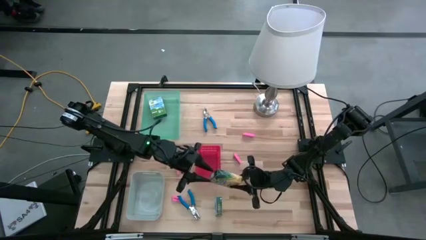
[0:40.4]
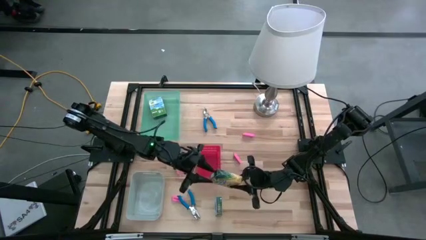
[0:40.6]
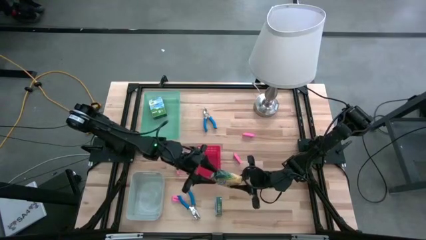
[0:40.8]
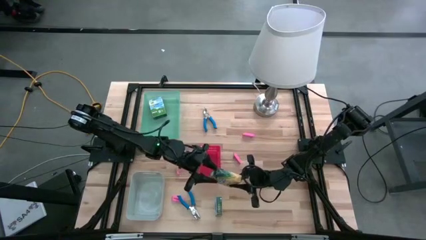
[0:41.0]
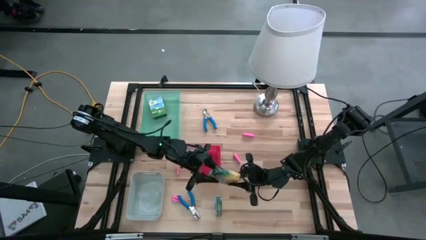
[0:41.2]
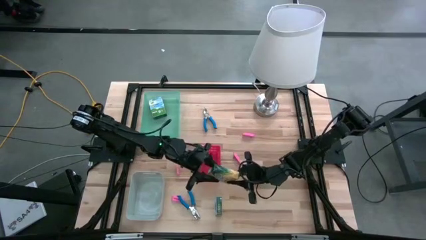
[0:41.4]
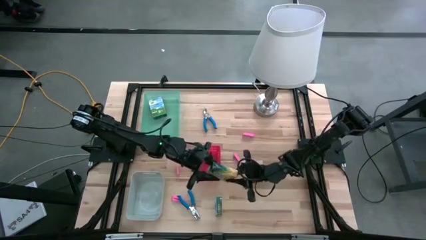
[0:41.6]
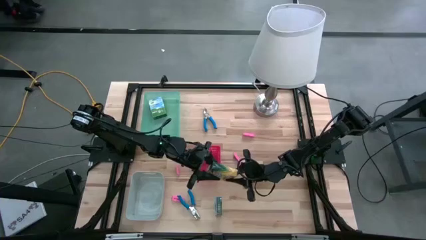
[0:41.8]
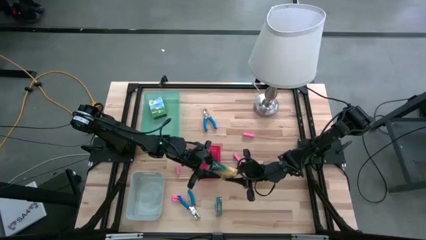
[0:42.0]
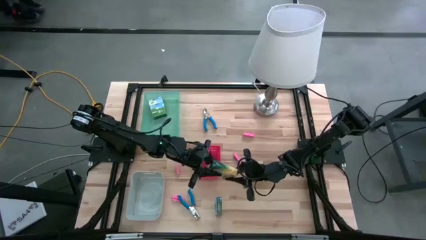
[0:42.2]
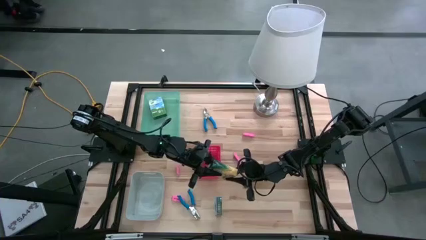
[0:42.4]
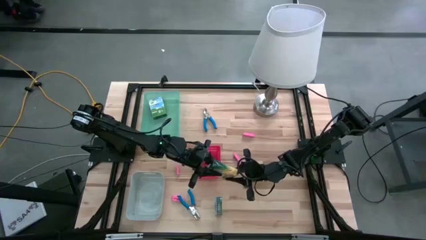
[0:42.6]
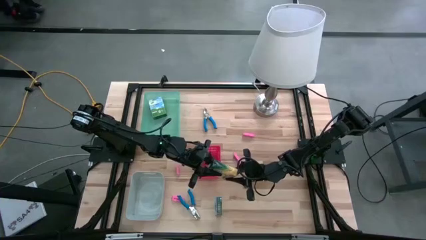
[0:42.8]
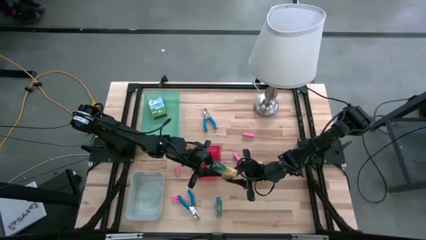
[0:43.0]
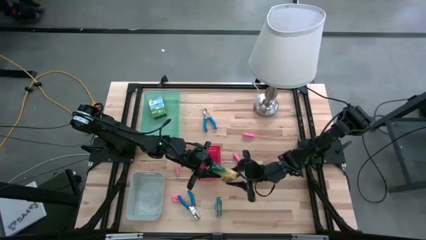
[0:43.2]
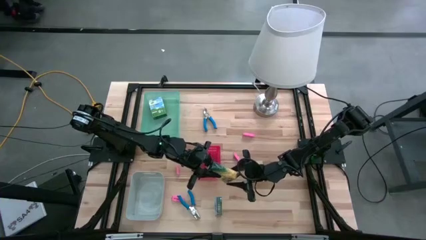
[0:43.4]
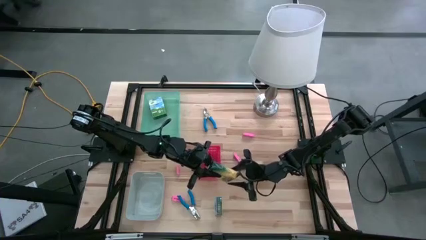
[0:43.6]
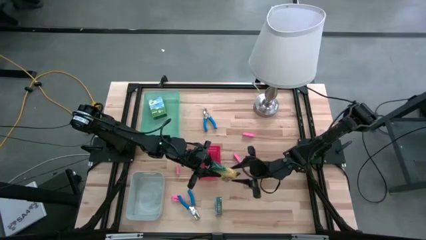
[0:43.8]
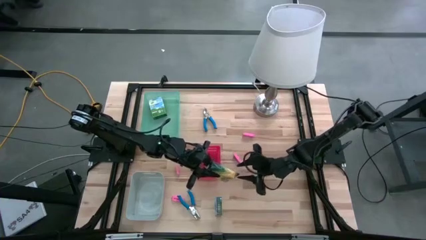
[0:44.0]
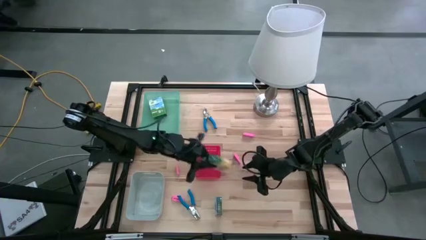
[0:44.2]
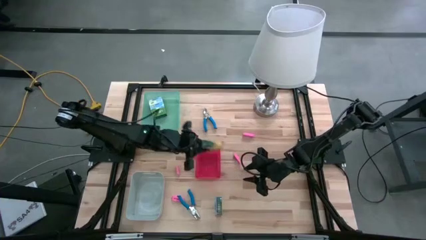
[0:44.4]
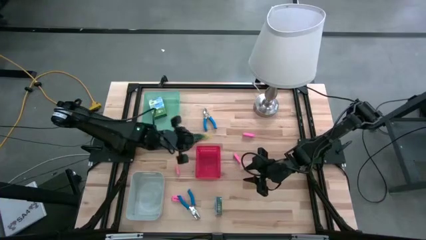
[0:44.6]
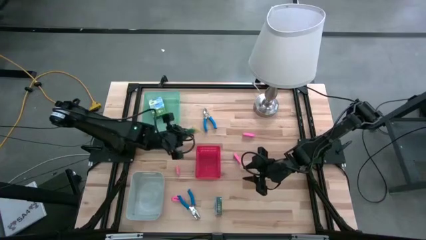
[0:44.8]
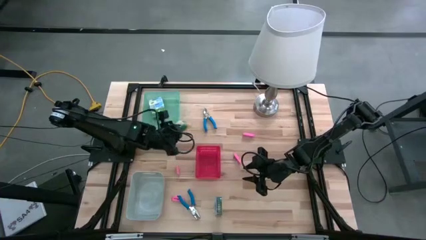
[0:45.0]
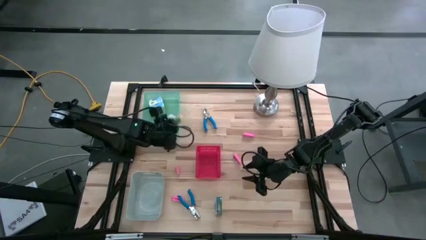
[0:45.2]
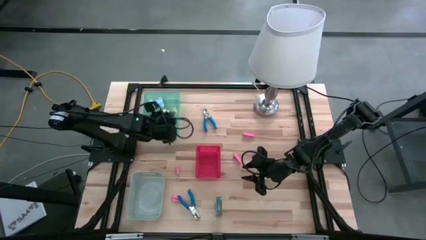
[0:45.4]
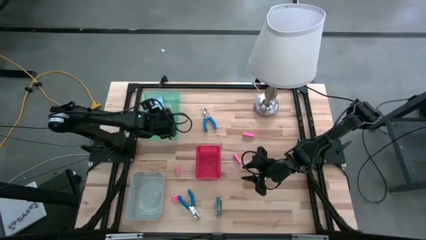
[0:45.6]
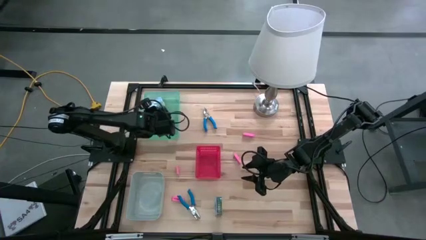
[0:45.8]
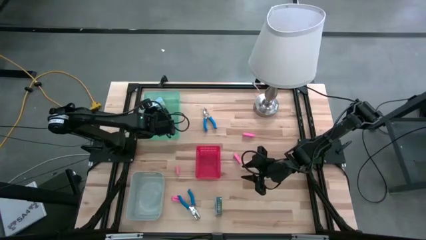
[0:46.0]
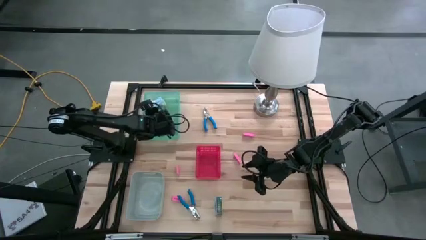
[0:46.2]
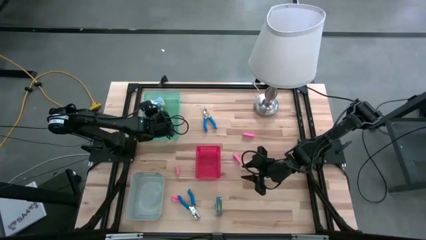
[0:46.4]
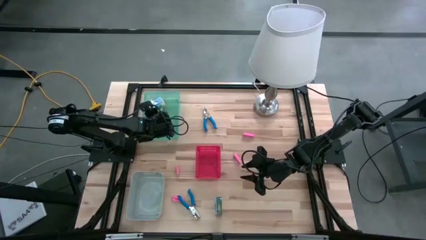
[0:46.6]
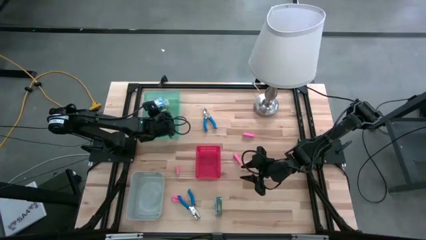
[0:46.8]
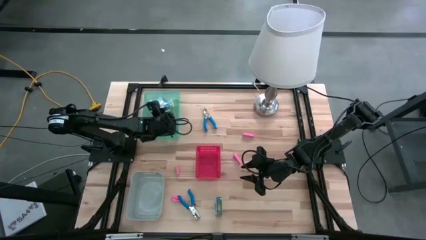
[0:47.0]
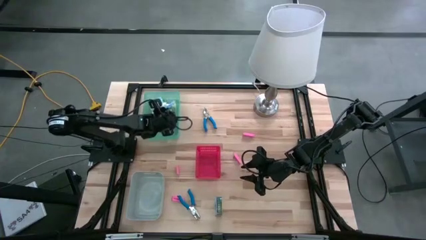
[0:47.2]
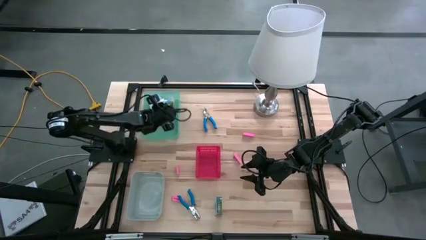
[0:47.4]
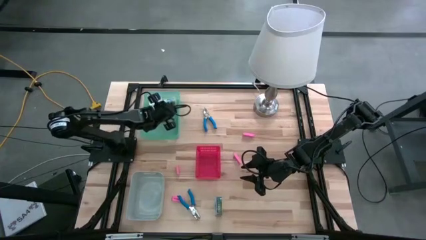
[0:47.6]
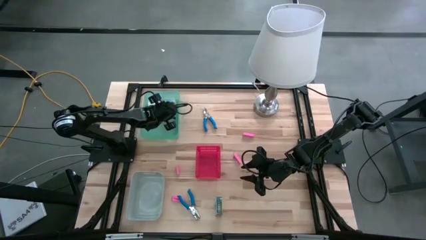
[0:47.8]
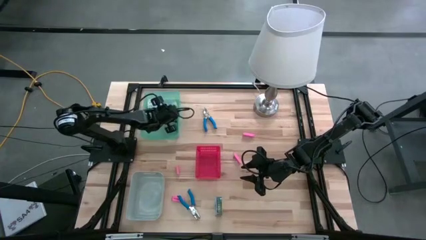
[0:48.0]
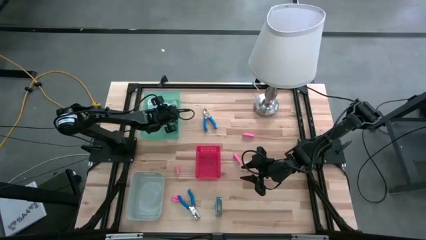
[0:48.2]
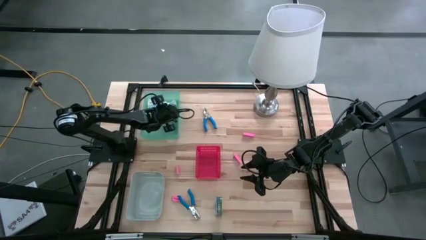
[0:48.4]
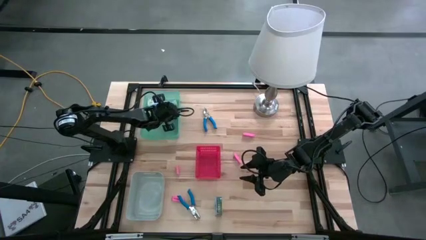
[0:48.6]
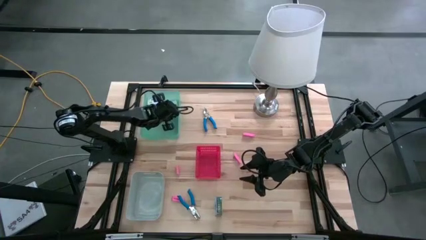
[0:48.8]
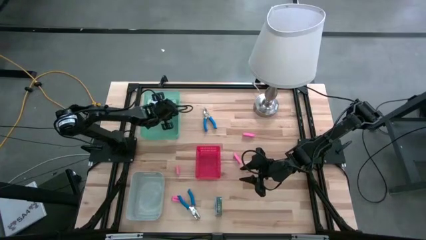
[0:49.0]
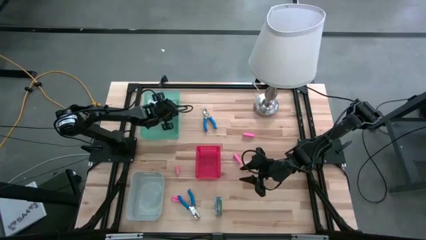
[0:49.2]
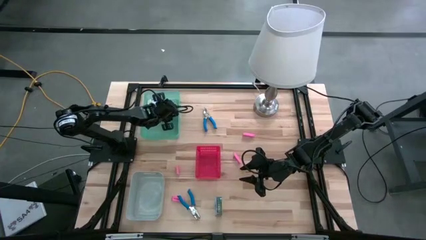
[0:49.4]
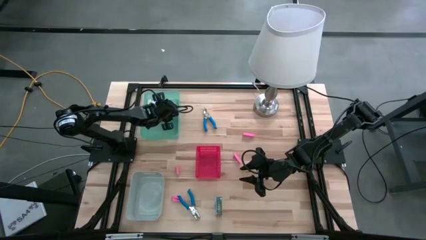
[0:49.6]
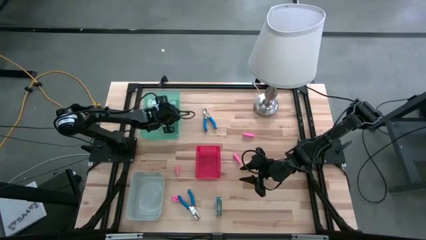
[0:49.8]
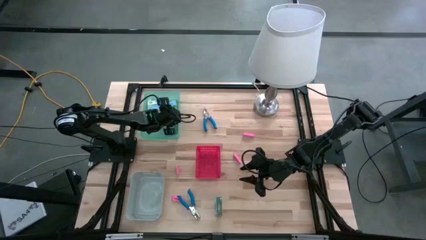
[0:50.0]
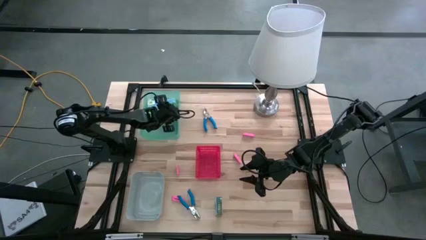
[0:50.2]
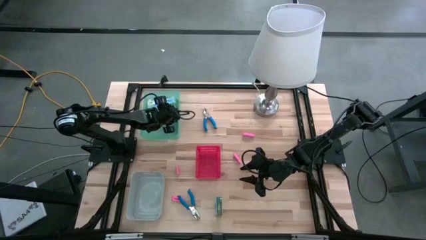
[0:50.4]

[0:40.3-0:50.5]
Task: Pick & Place School Supplies
Put the top yellow crayon box into the green bin

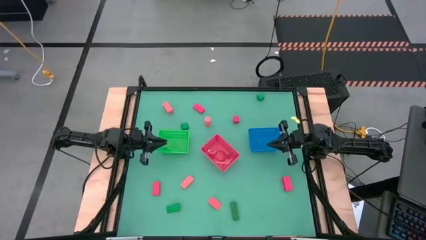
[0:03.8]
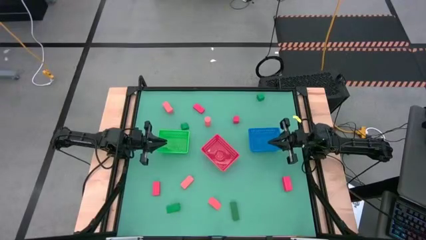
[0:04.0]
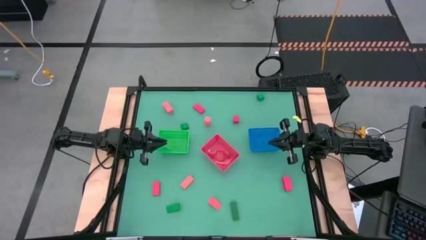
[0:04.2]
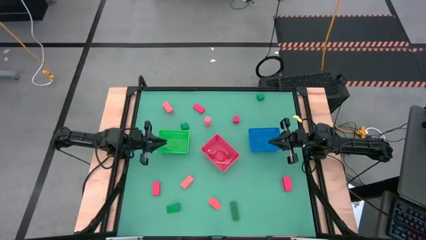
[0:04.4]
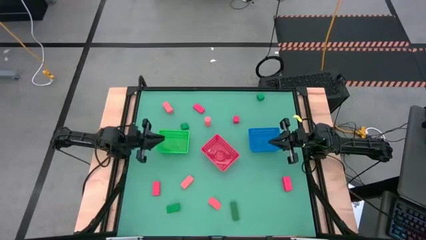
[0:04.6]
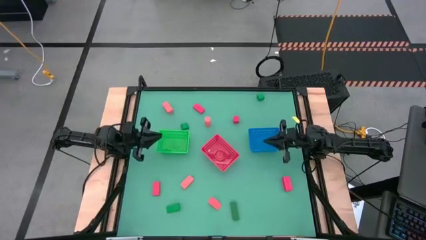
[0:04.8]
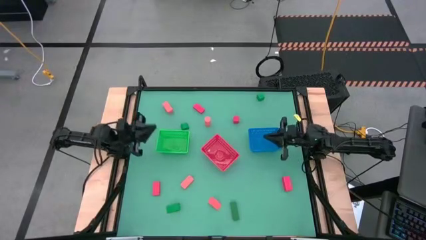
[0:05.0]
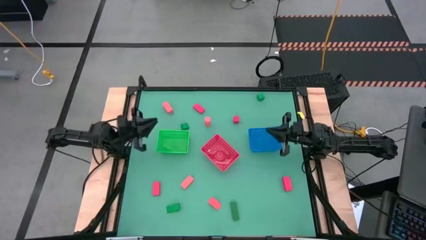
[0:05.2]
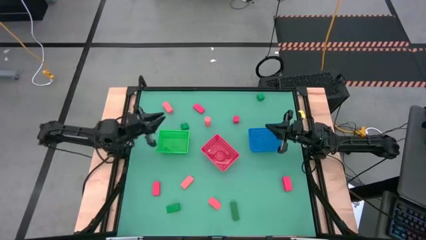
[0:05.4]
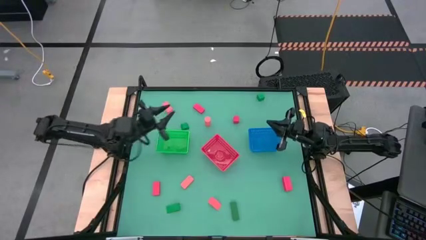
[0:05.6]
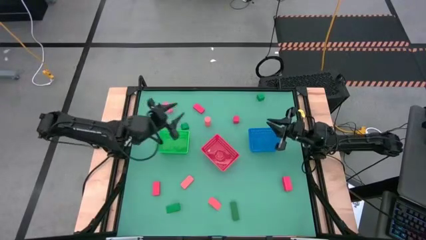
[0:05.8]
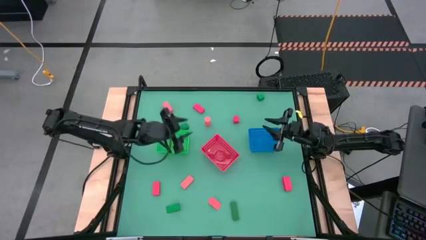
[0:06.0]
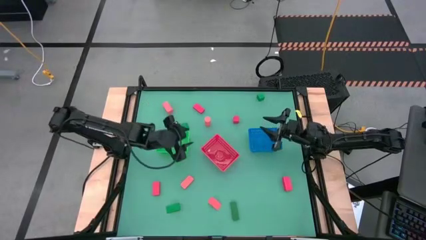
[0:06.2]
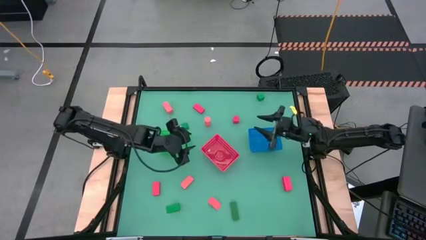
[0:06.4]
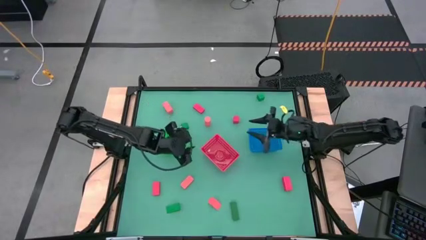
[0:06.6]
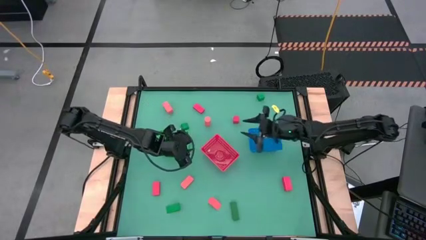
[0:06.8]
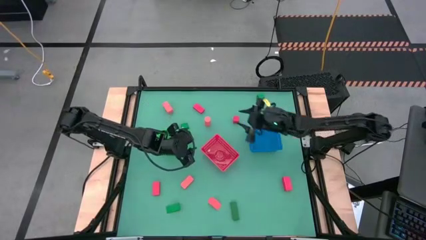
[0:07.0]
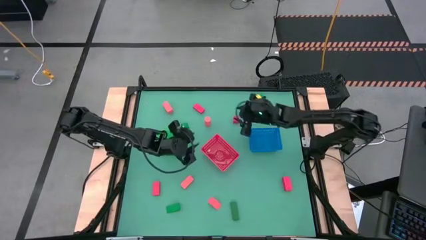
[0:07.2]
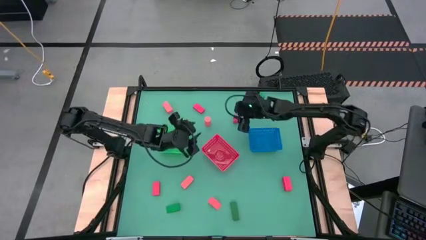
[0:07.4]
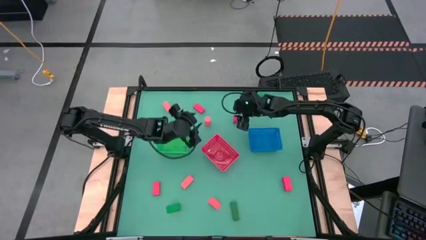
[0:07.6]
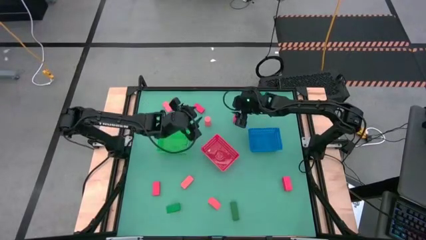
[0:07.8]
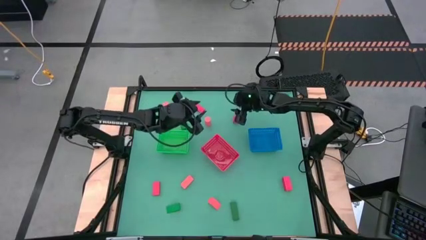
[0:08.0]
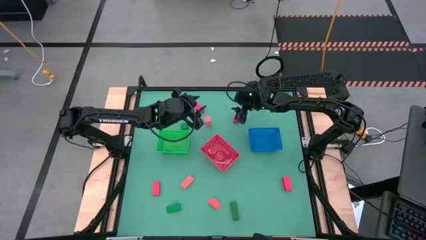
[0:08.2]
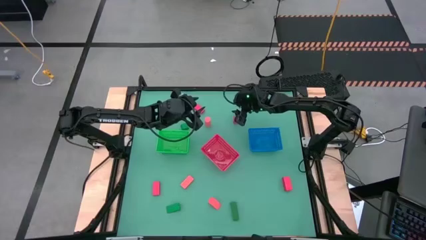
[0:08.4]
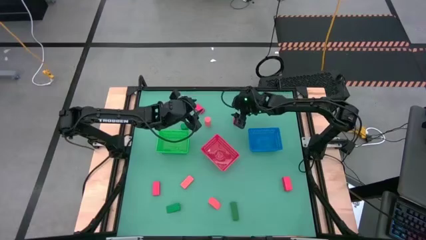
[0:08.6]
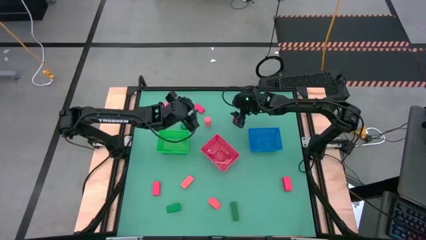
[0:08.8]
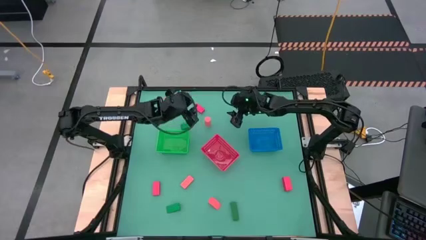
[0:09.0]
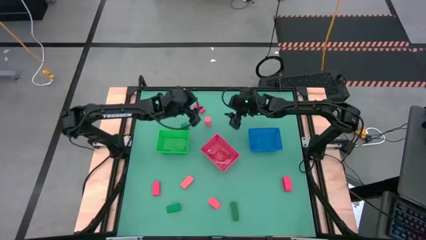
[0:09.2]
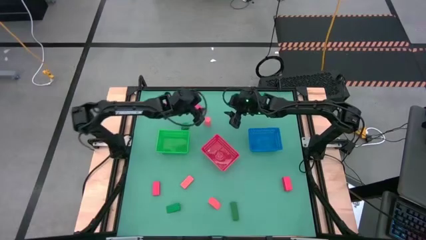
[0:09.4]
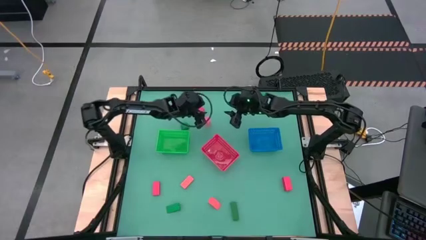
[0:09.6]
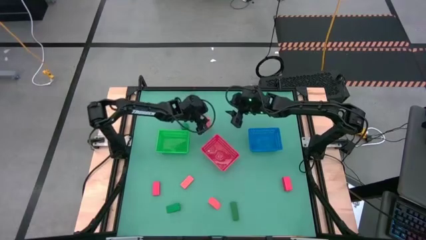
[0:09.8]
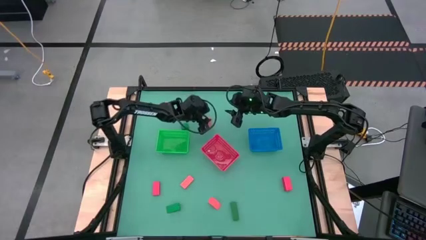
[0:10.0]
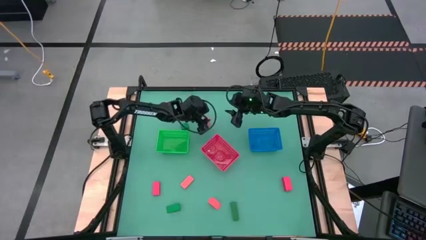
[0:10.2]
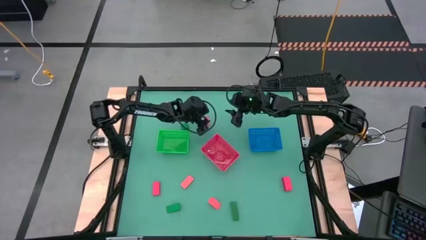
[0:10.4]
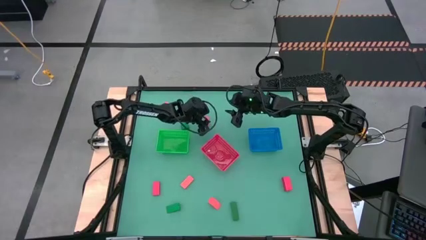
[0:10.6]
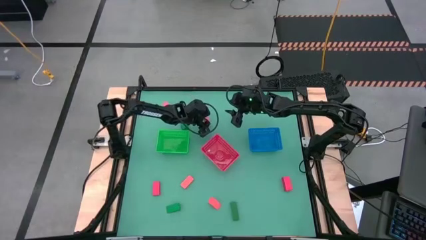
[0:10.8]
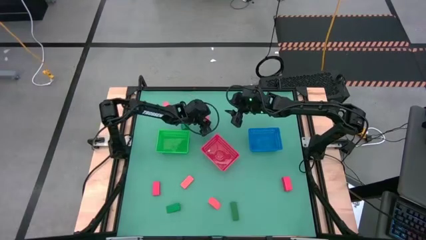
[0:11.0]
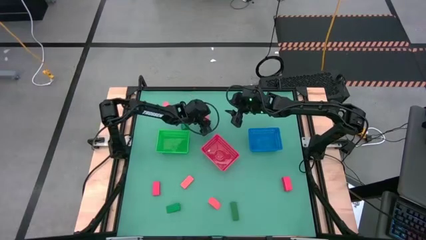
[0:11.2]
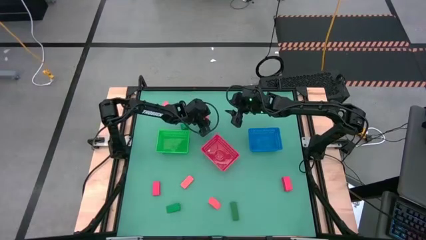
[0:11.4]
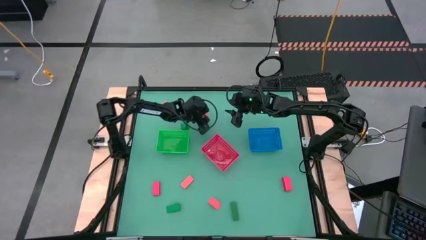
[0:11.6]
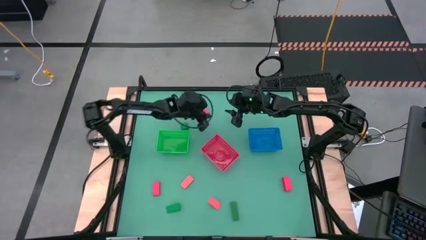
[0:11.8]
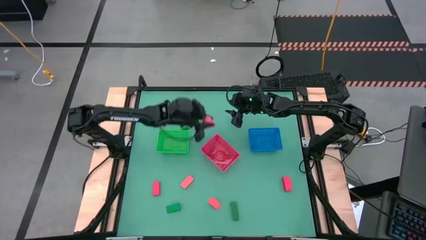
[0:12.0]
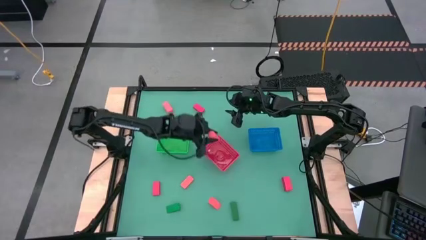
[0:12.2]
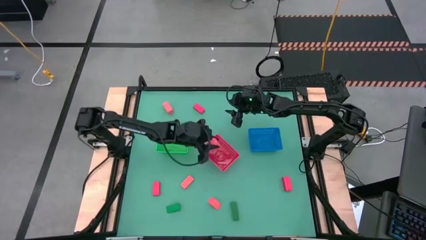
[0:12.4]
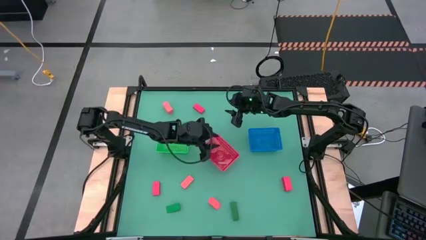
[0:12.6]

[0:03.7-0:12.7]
Task: Sort & place blocks by color
Put the pink block into the red bin
